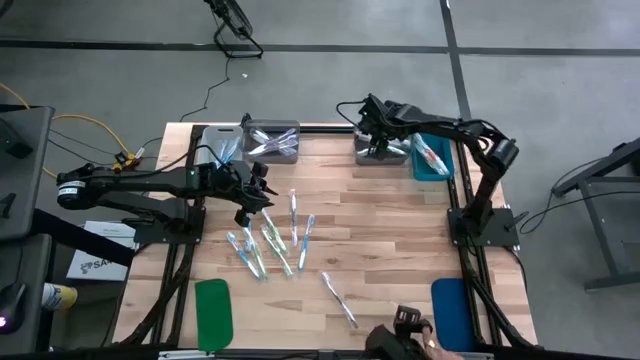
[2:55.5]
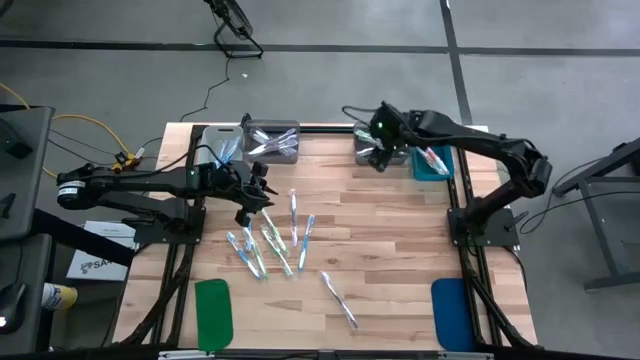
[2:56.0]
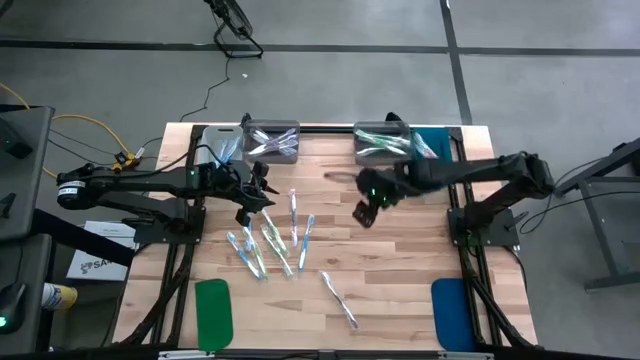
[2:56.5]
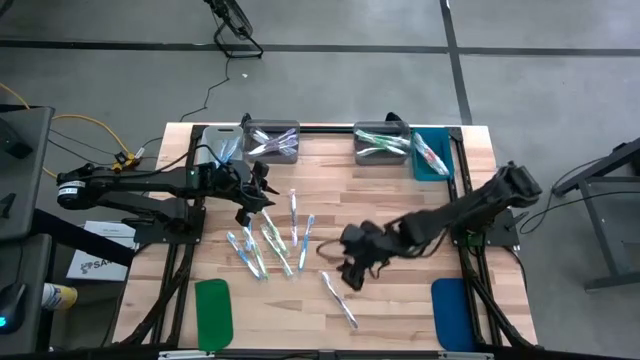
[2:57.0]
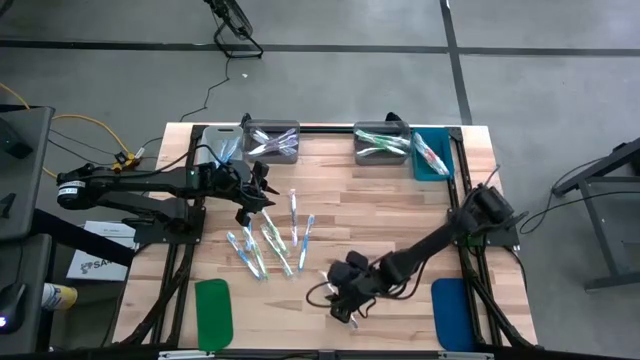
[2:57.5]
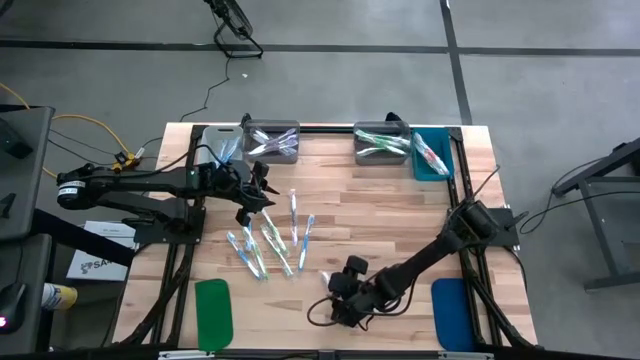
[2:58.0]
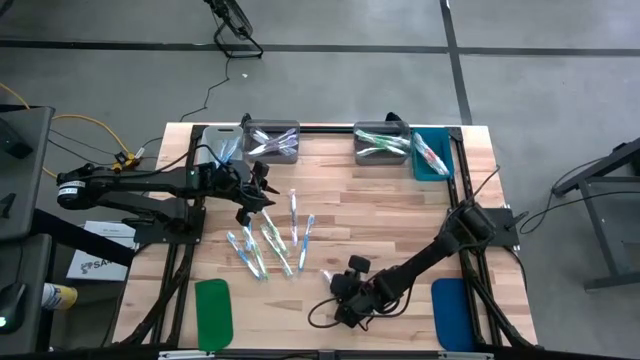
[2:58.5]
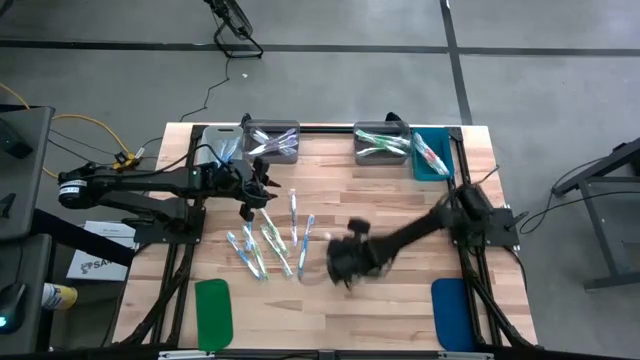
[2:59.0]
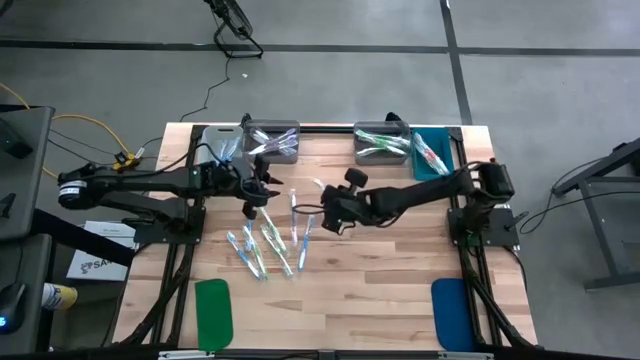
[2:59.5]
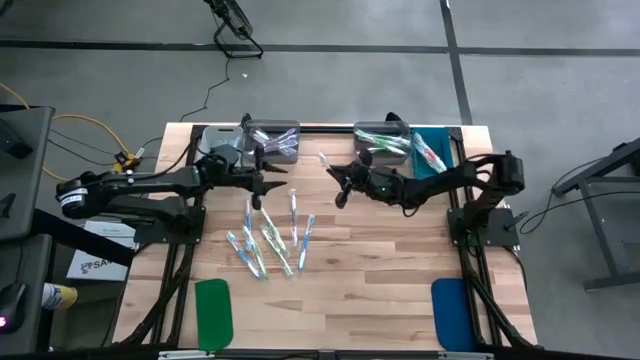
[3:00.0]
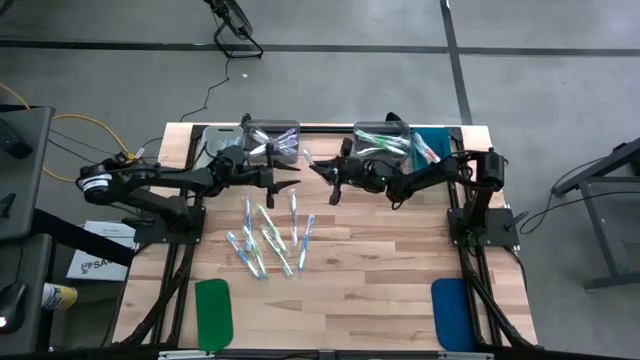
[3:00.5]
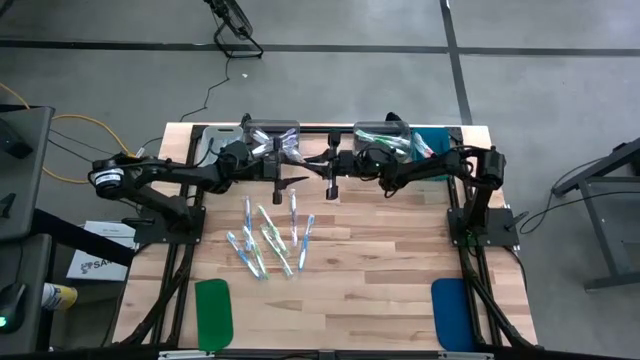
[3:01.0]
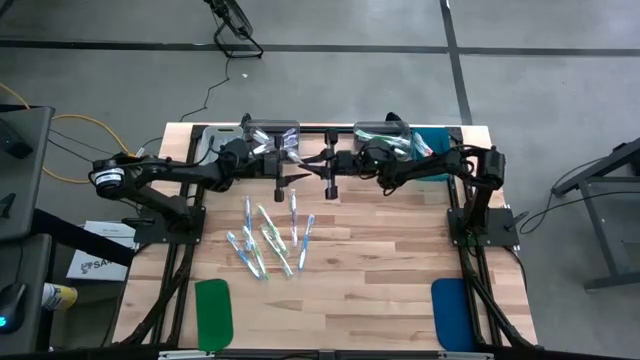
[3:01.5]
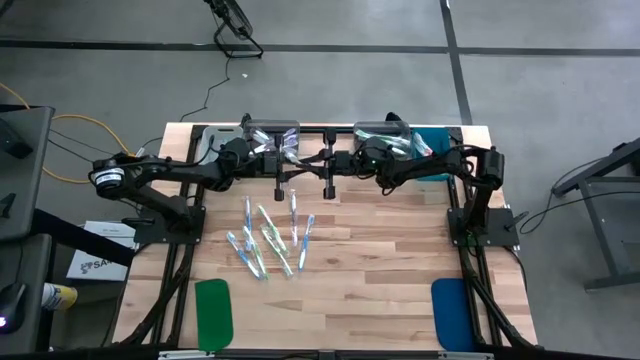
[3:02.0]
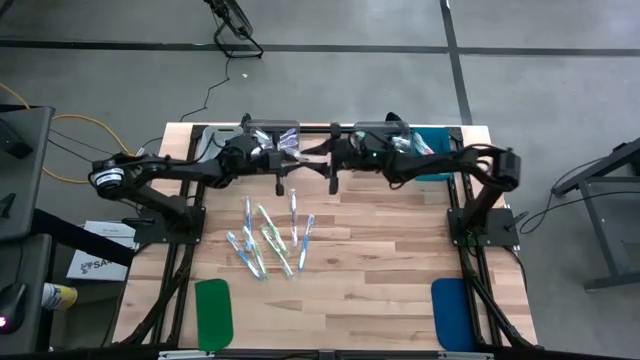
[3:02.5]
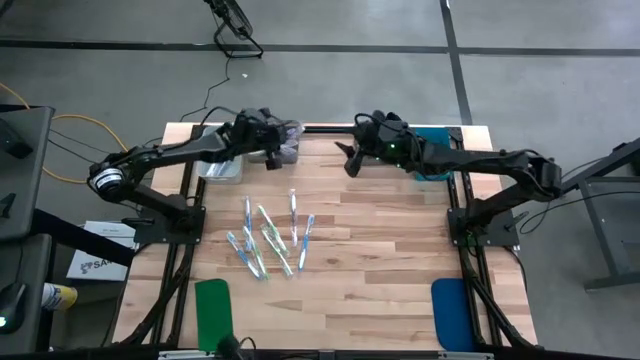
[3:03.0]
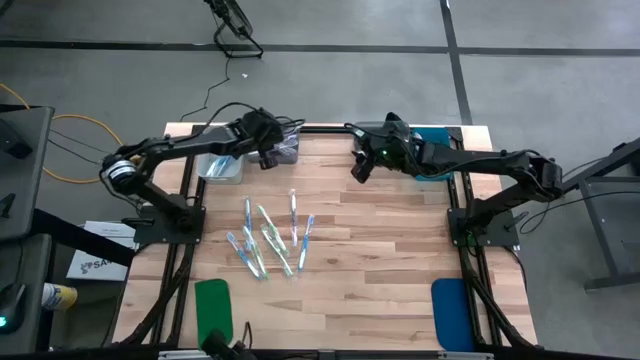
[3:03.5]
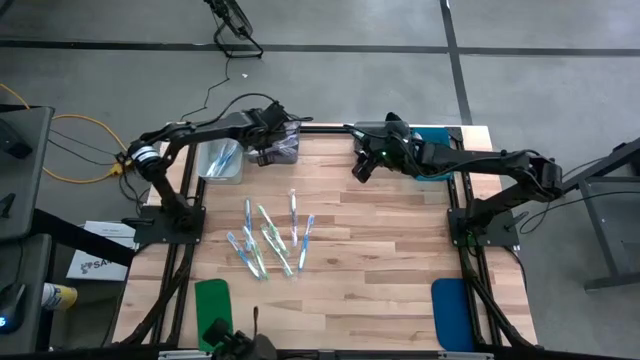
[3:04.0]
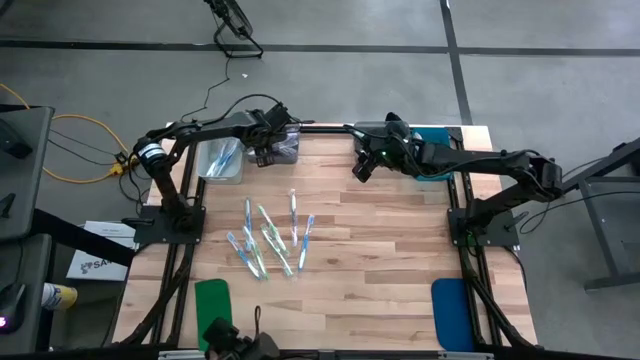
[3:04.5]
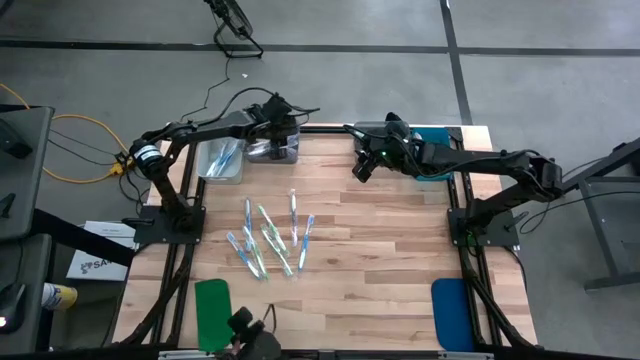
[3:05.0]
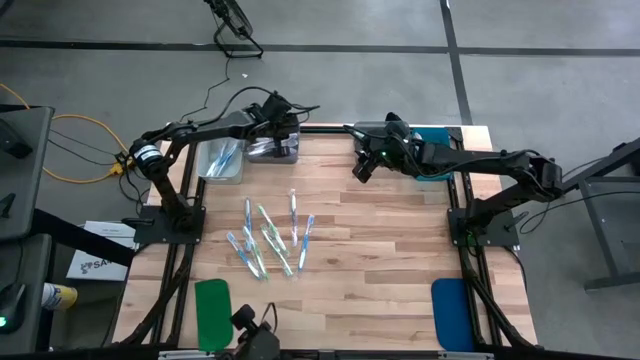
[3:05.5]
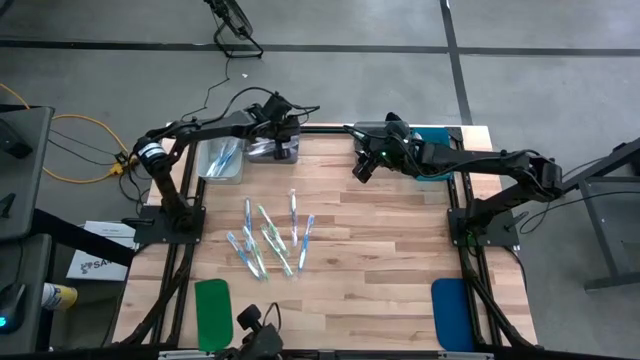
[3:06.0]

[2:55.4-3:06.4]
Task: Pick & Place Toothbrushes
Put the violet toothbrush into the left black bin

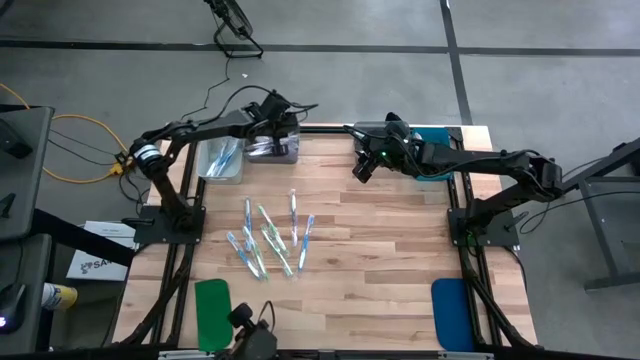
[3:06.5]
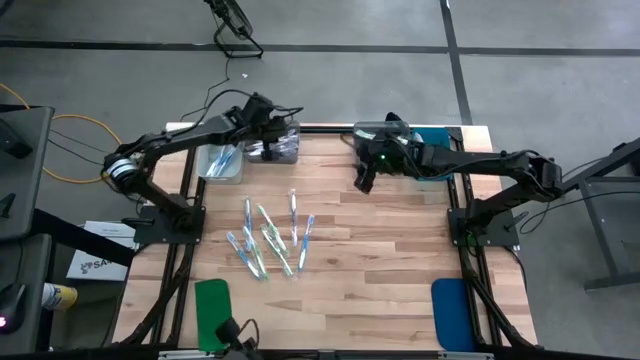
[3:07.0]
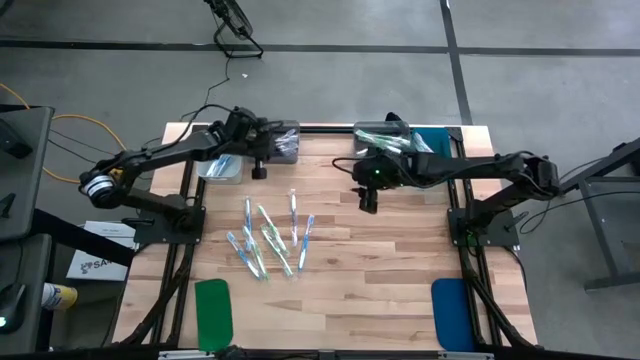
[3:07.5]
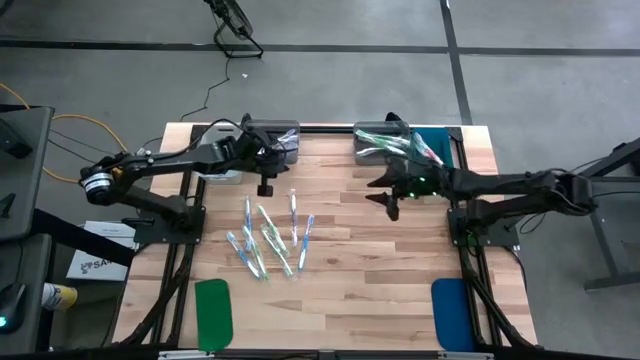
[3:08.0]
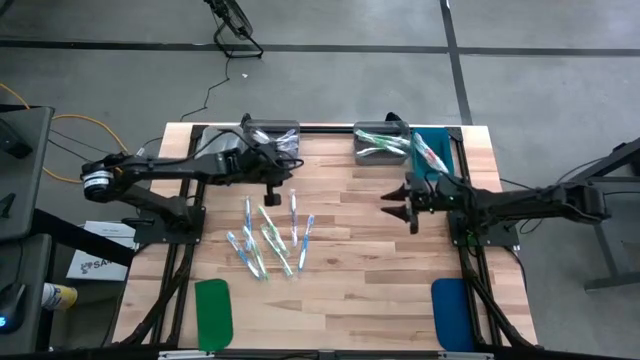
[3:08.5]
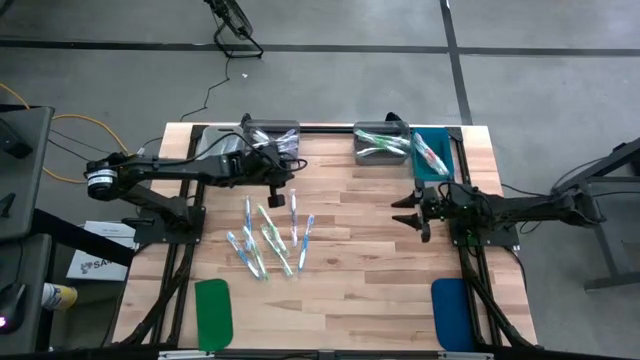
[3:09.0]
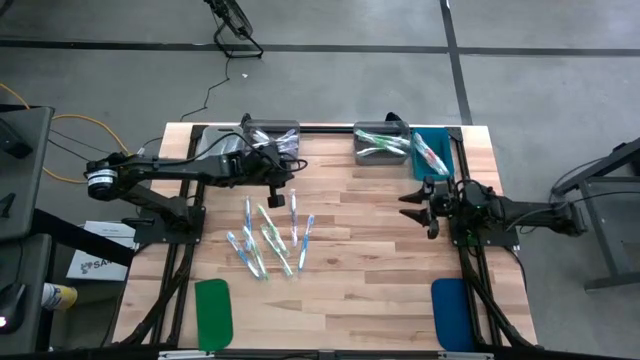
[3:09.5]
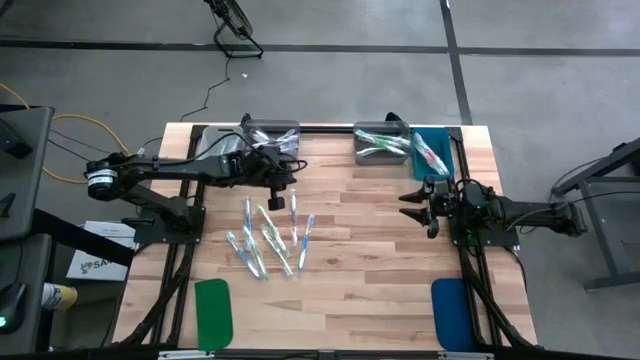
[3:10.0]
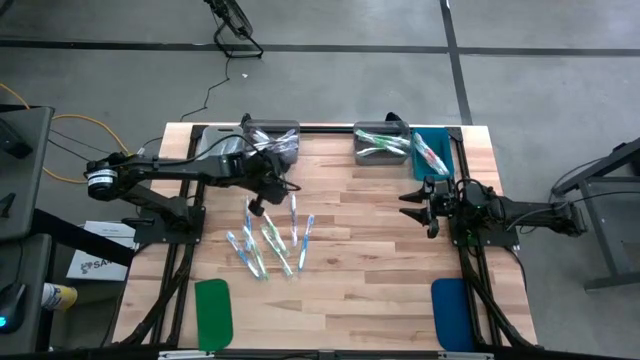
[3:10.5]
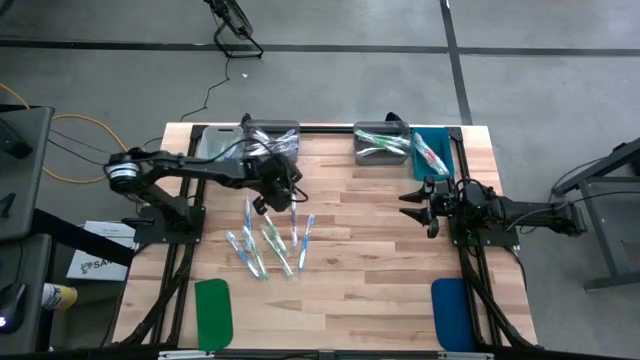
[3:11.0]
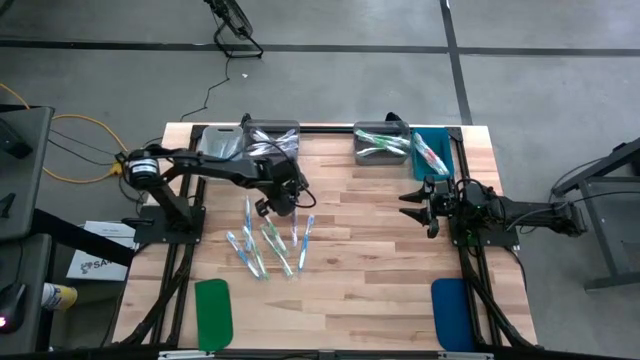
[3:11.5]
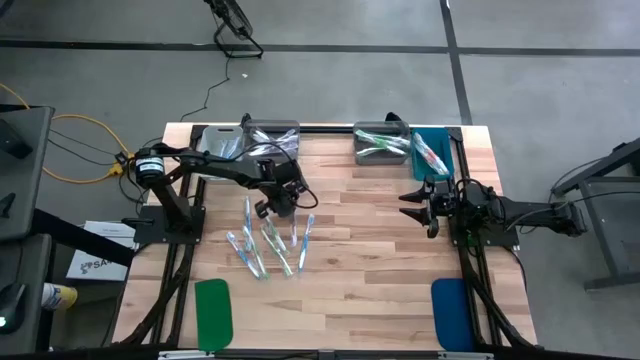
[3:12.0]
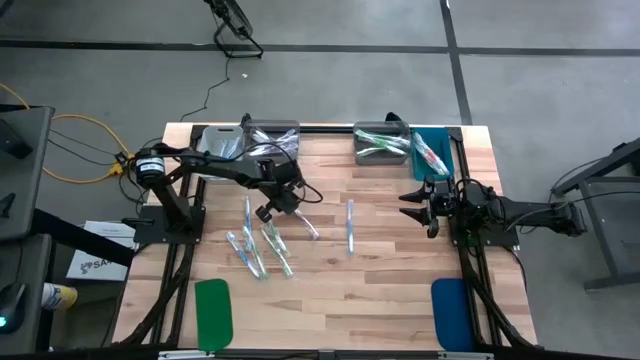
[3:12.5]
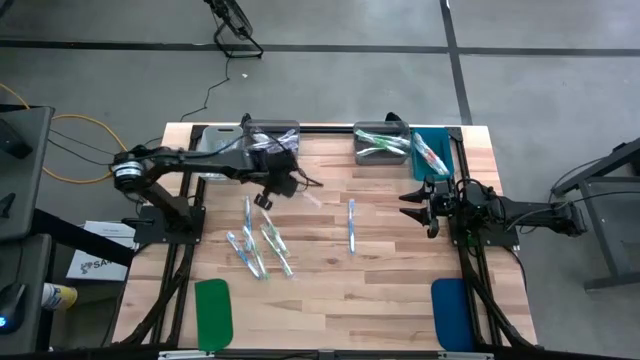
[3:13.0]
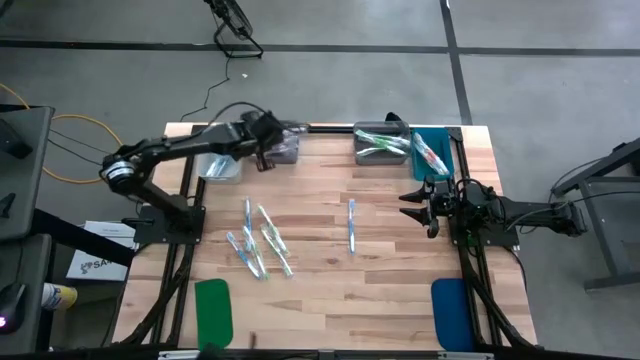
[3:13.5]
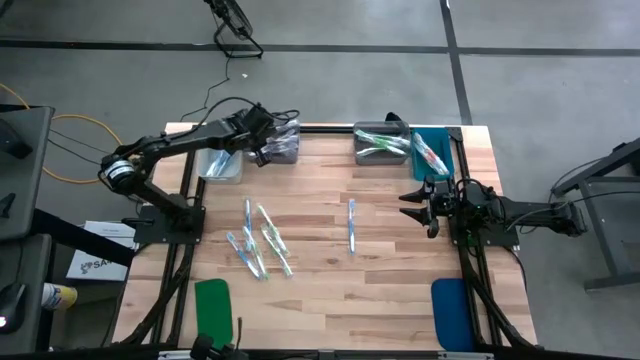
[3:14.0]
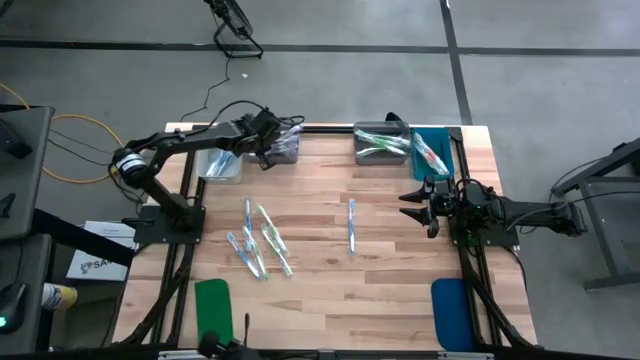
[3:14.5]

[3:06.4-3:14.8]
Put the violet toothbrush into the left black bin

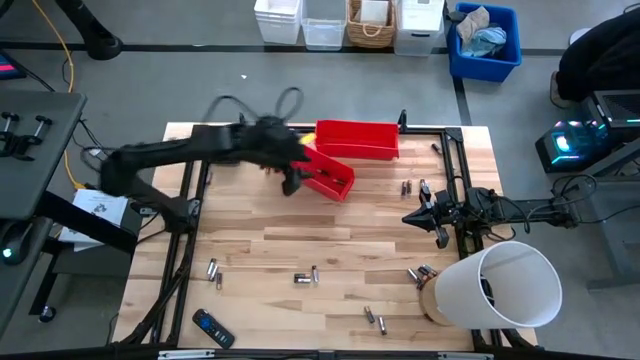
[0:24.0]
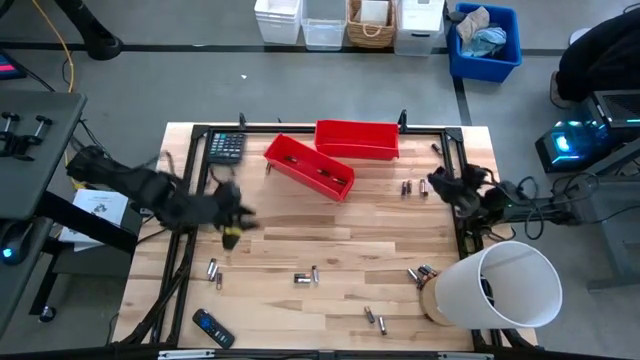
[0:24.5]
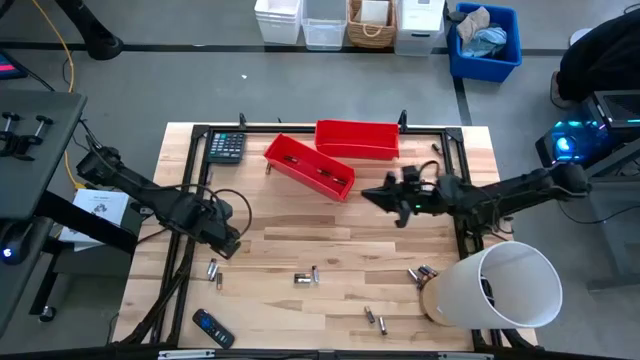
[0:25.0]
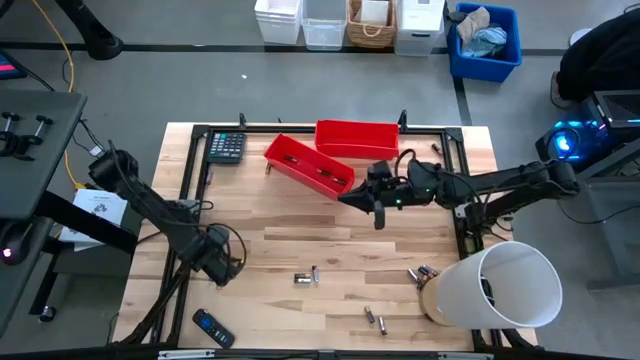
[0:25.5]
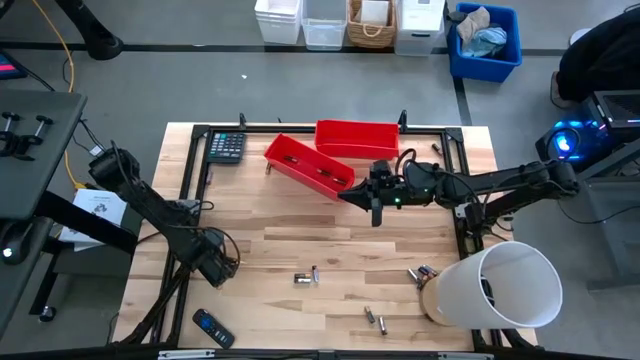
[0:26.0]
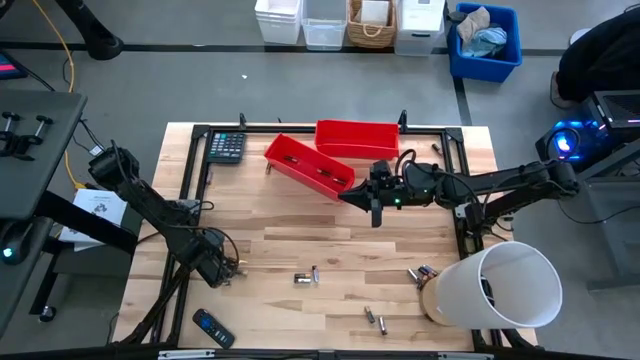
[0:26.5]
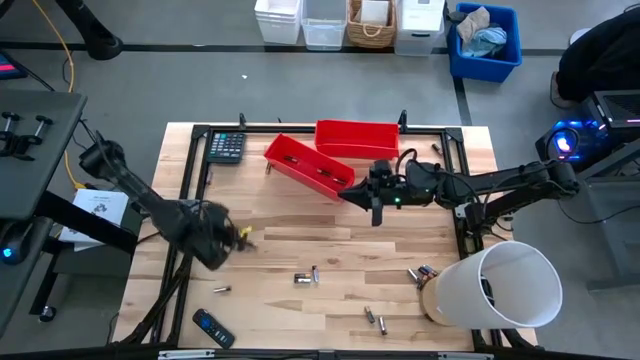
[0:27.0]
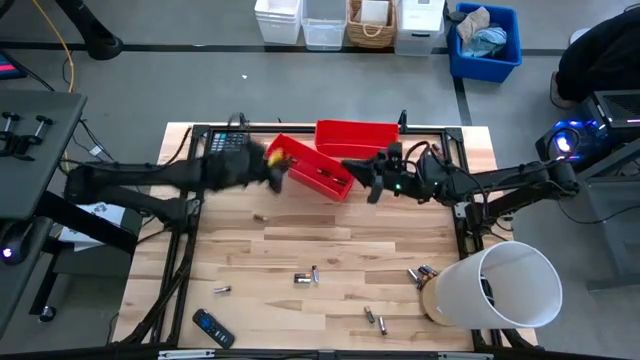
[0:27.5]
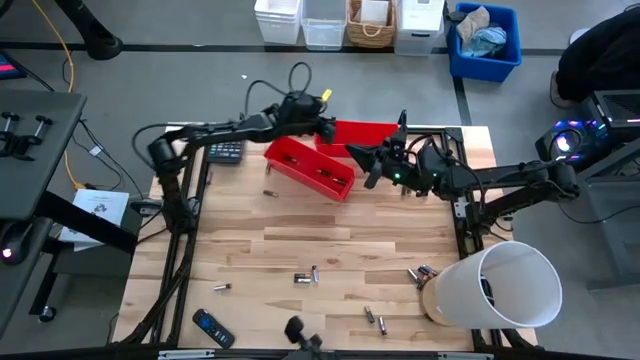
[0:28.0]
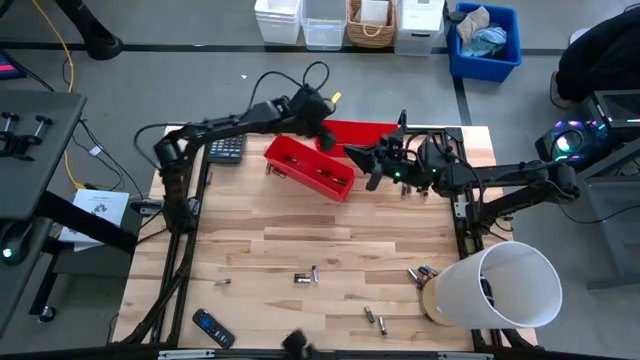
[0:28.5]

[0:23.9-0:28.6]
Task: Sort batteries
Put the silver battery into the top red bin
